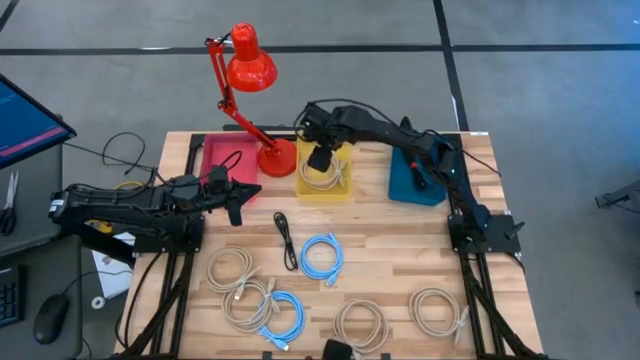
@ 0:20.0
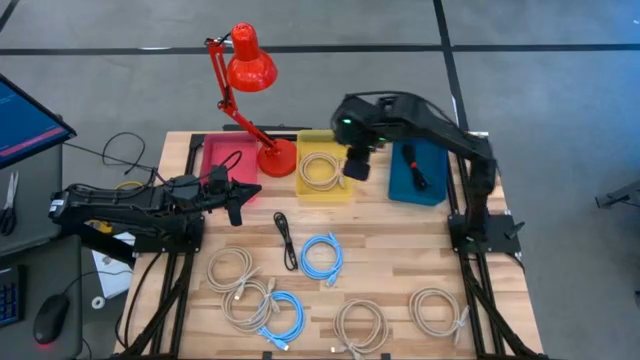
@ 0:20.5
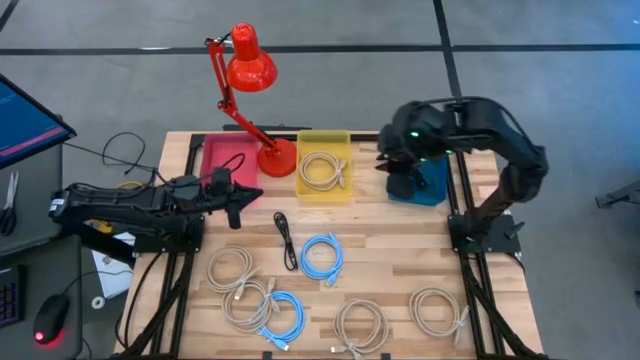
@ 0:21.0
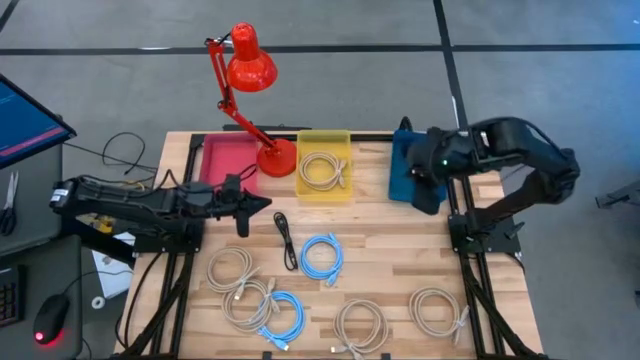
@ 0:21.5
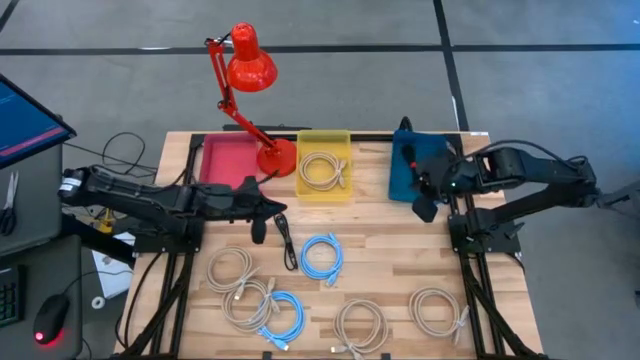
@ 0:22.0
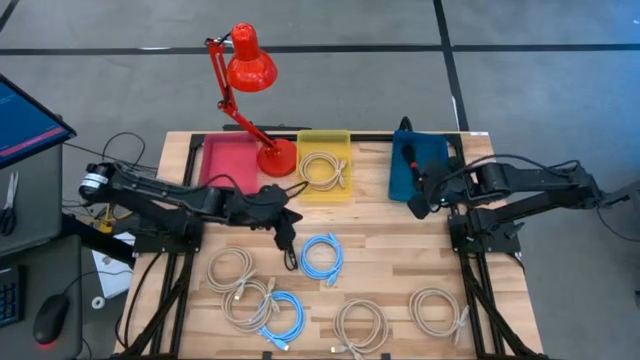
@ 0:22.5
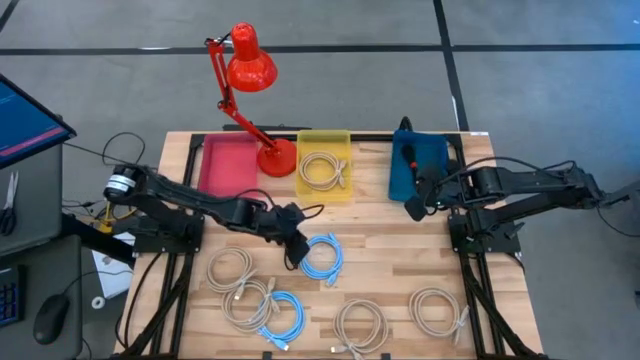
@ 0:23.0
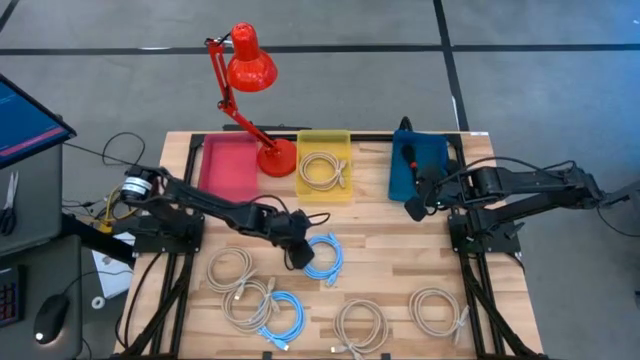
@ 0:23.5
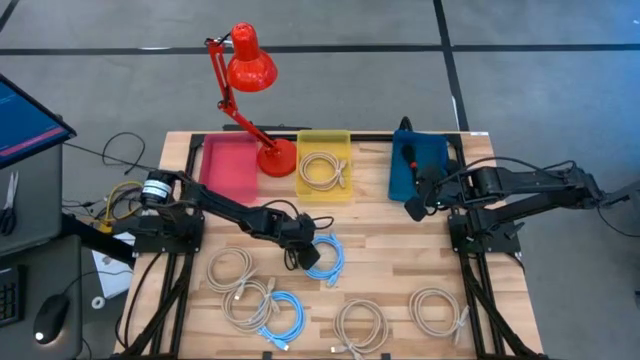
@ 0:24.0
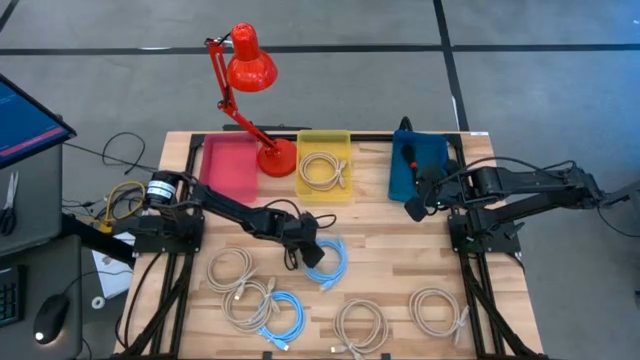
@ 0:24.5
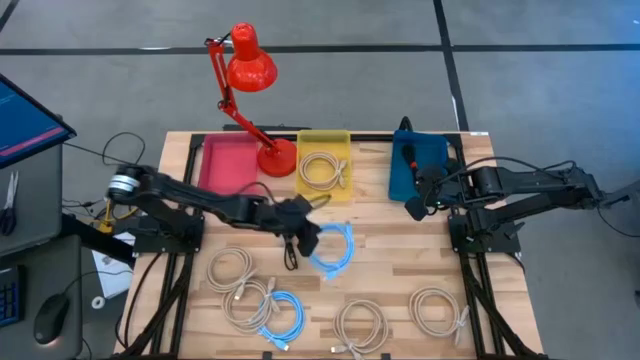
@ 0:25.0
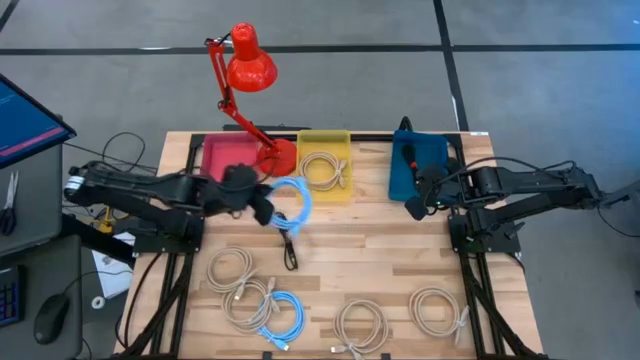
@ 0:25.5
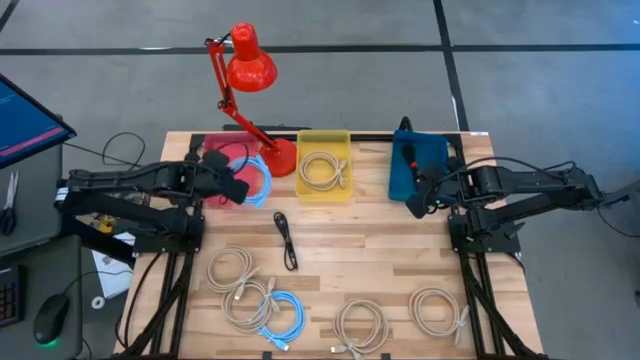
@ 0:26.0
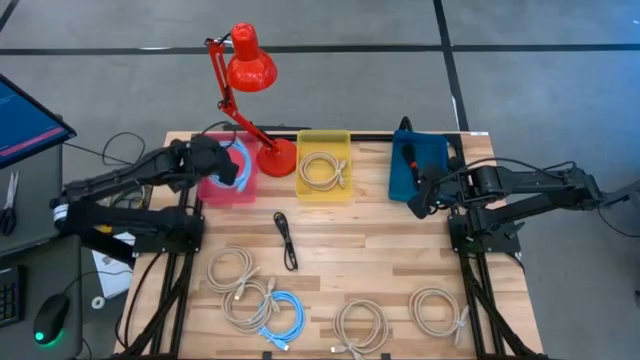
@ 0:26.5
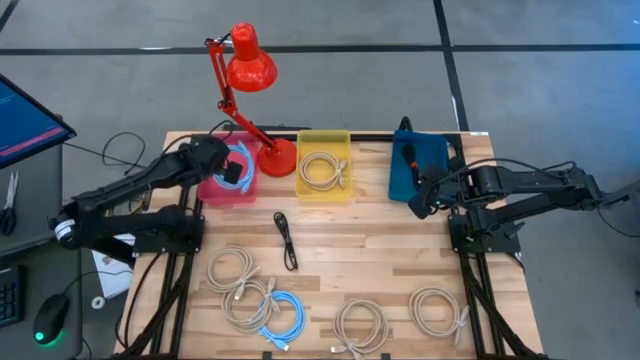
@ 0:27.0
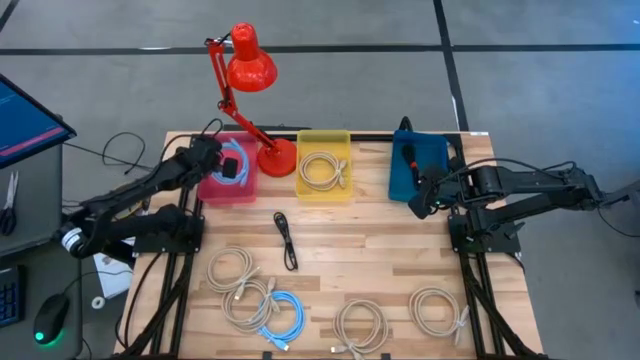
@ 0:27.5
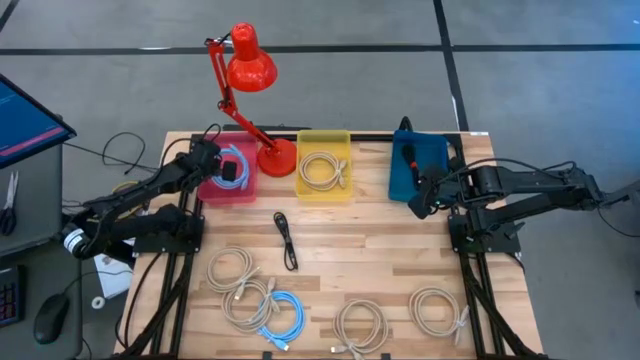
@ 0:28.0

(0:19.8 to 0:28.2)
Task: Sort HDMI cables
Put the light blue HDMI cable into the pink bin

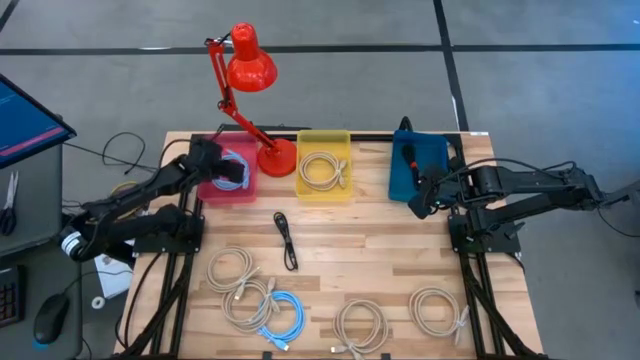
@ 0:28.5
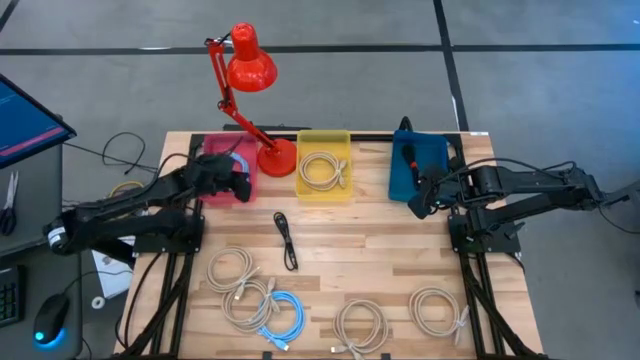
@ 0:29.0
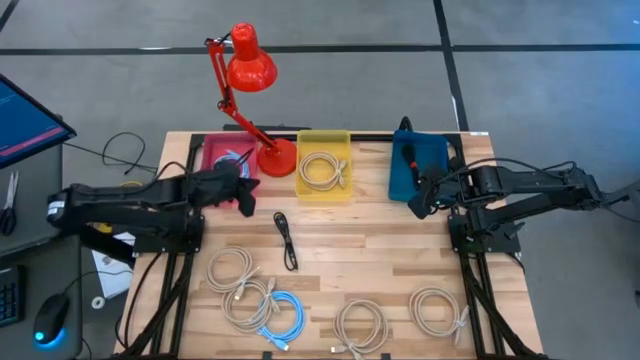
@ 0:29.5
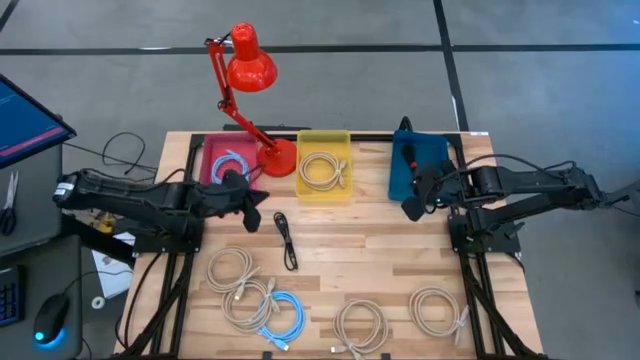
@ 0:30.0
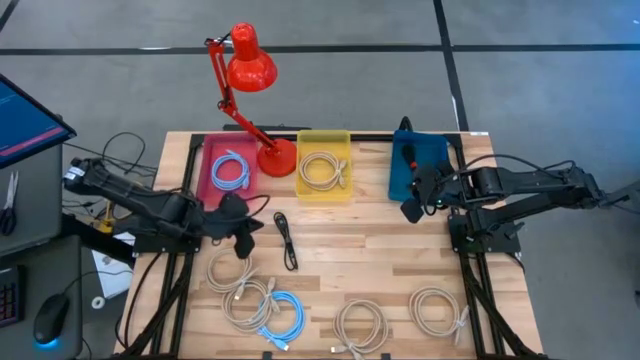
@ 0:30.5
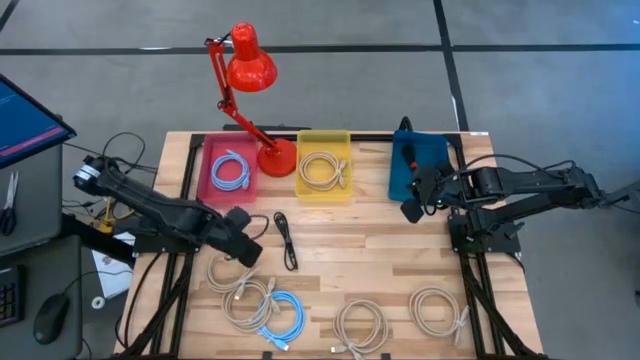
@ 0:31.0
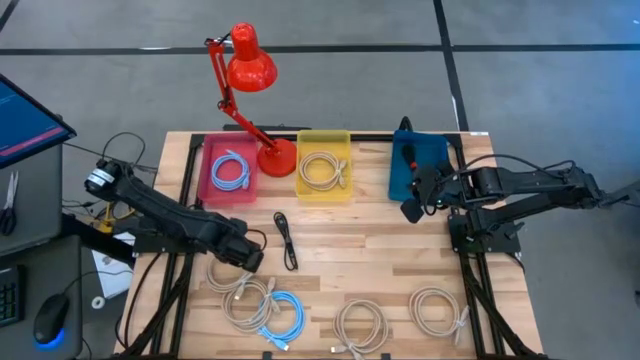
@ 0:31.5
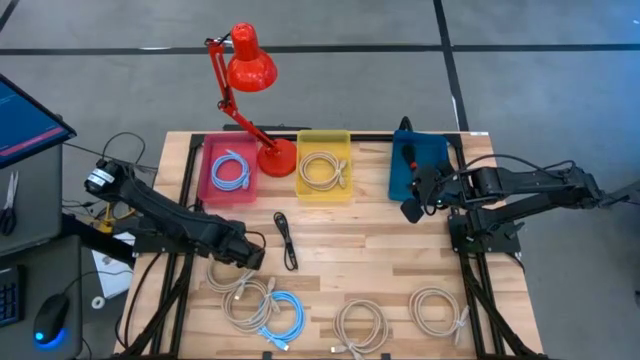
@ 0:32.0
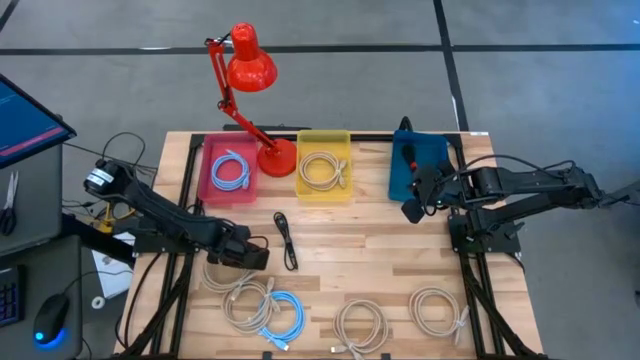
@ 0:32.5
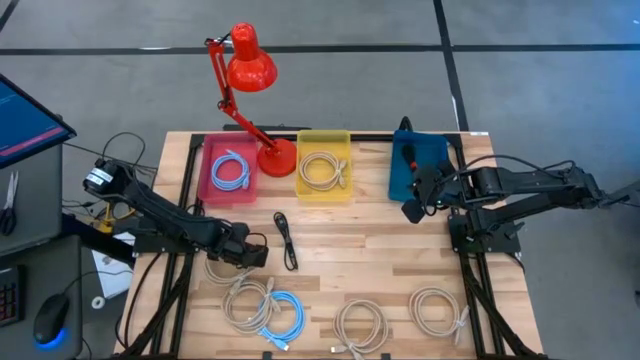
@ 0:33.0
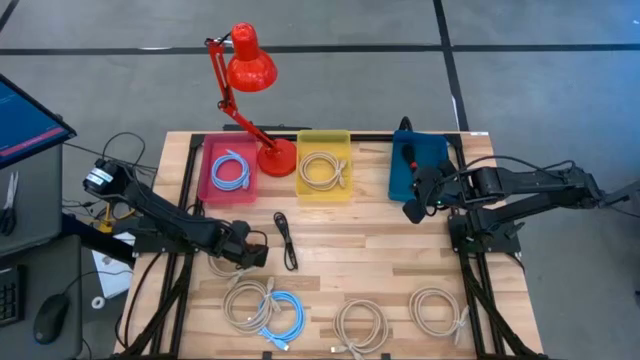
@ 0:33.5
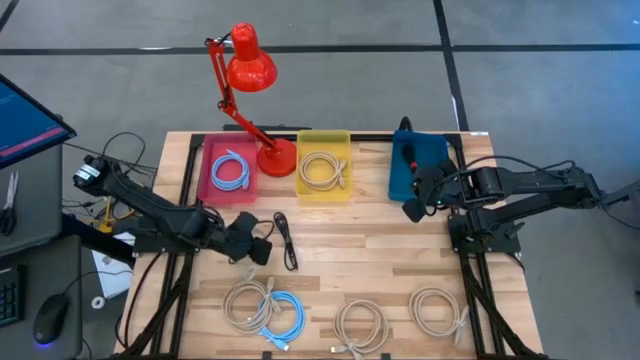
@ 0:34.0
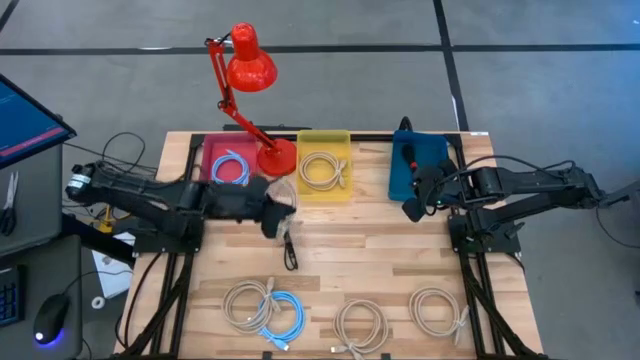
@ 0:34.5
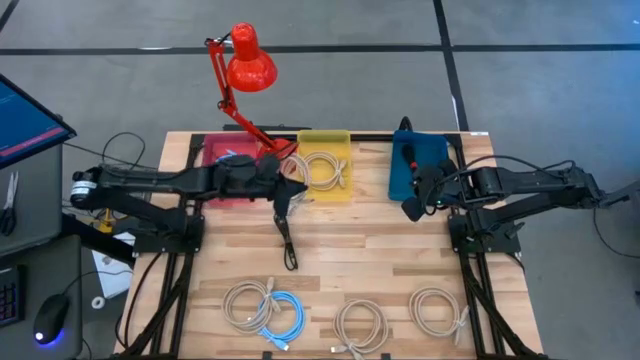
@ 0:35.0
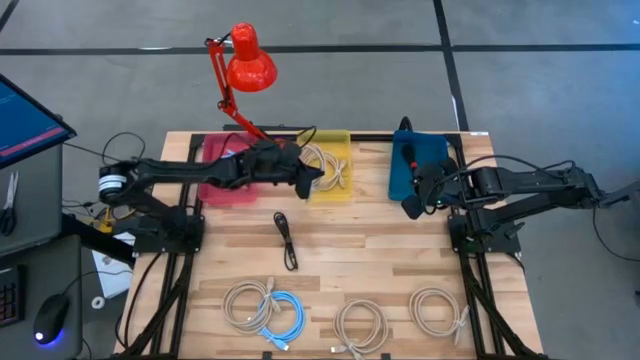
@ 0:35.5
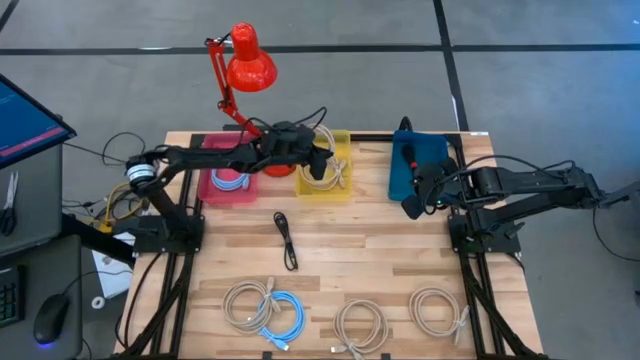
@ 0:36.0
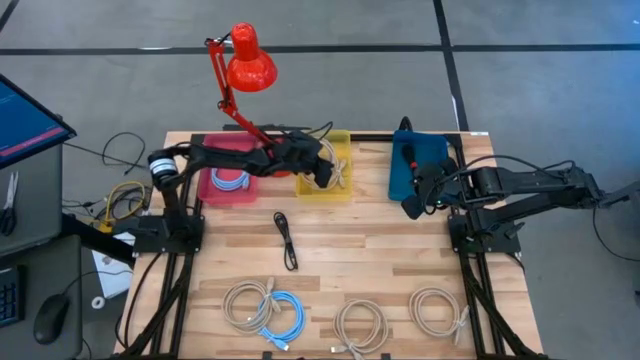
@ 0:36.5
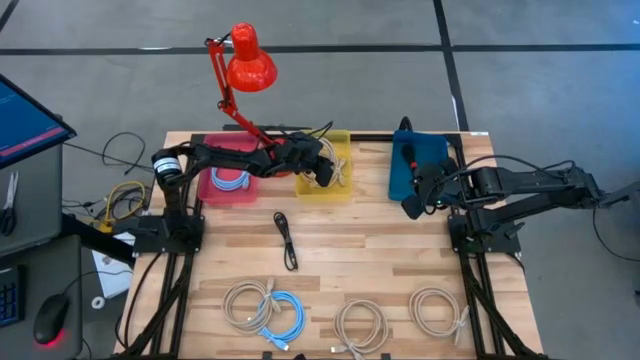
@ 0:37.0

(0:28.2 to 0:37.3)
Put the light brown HDMI cable into the yellow bin
